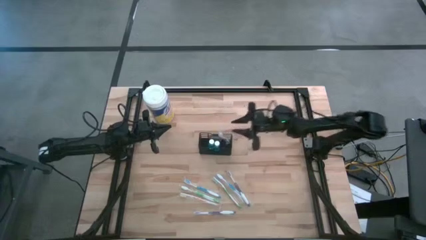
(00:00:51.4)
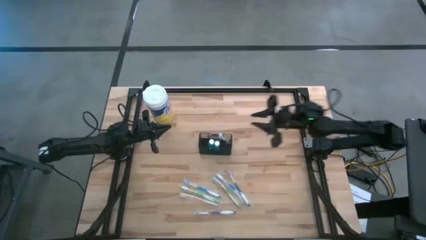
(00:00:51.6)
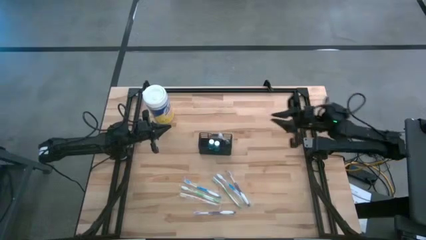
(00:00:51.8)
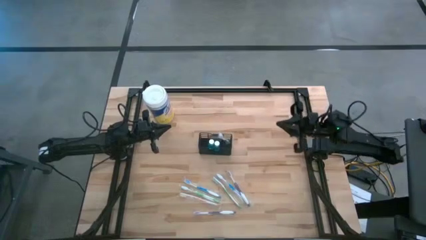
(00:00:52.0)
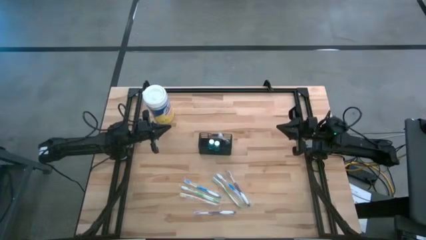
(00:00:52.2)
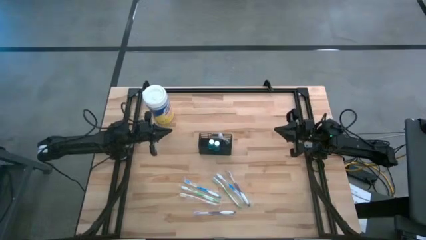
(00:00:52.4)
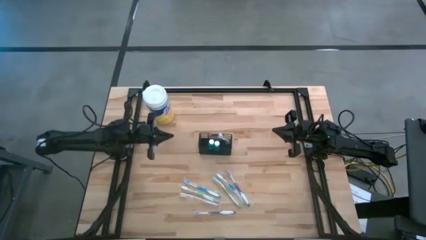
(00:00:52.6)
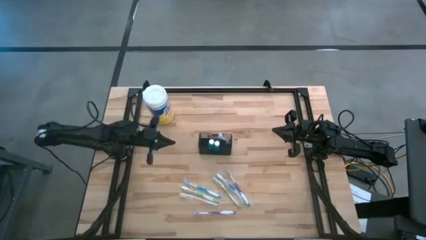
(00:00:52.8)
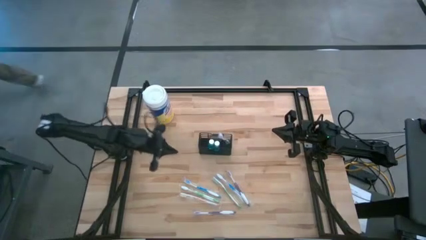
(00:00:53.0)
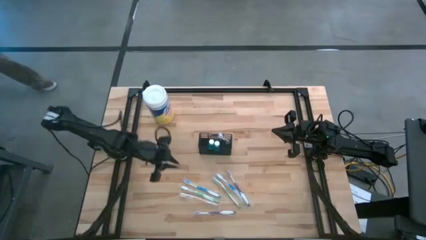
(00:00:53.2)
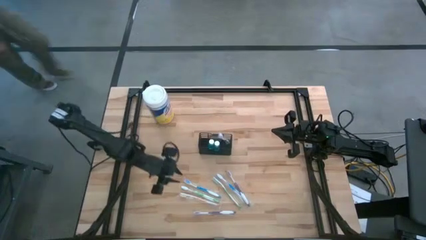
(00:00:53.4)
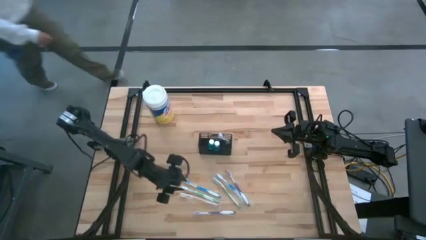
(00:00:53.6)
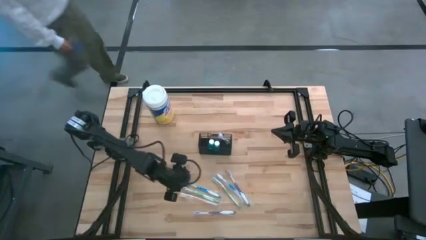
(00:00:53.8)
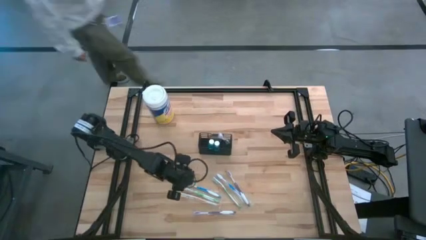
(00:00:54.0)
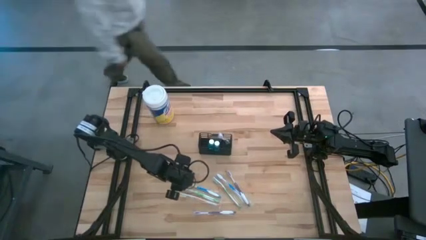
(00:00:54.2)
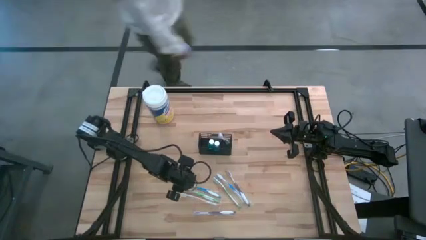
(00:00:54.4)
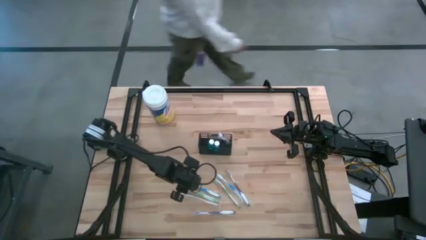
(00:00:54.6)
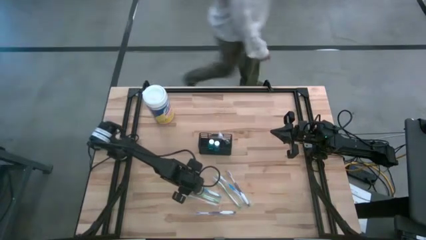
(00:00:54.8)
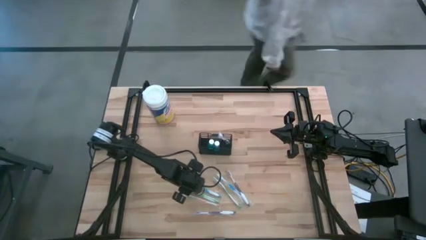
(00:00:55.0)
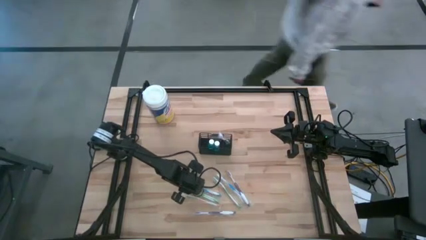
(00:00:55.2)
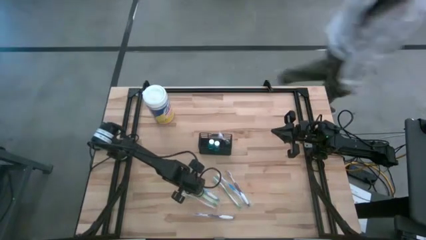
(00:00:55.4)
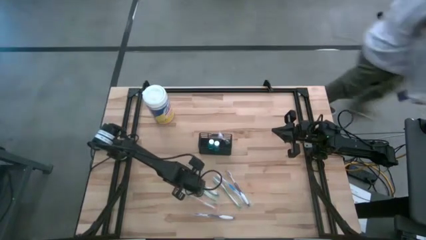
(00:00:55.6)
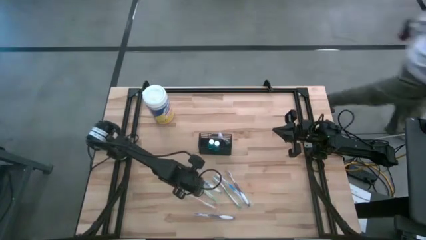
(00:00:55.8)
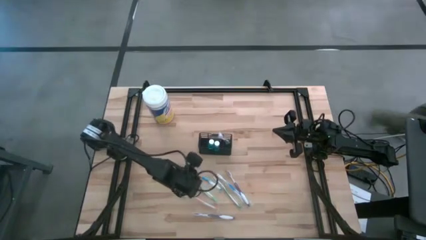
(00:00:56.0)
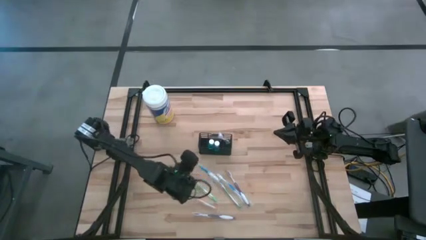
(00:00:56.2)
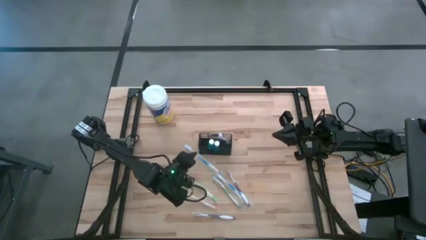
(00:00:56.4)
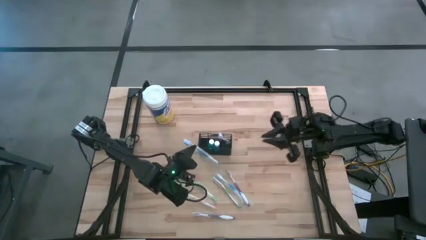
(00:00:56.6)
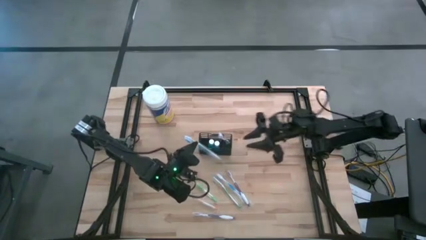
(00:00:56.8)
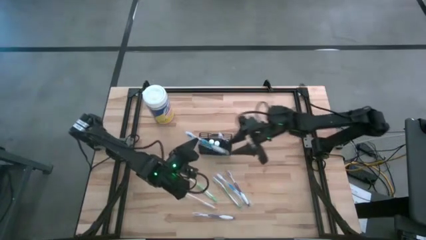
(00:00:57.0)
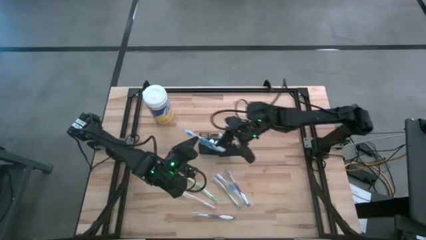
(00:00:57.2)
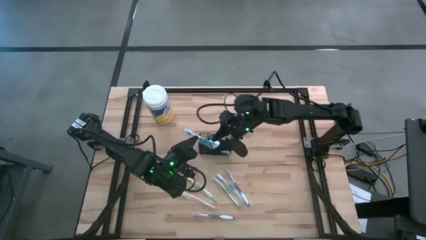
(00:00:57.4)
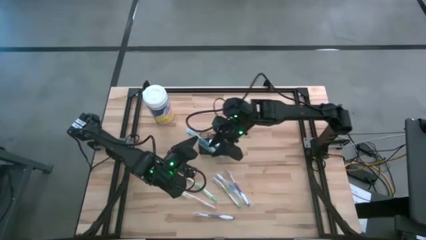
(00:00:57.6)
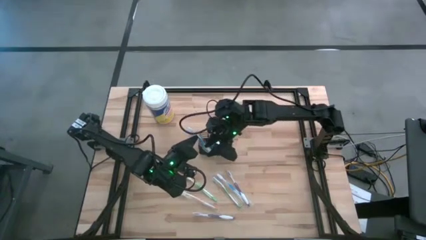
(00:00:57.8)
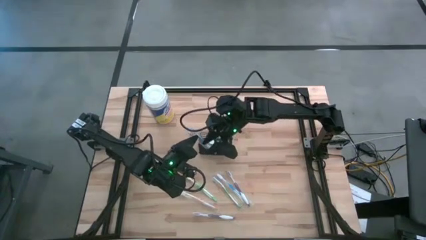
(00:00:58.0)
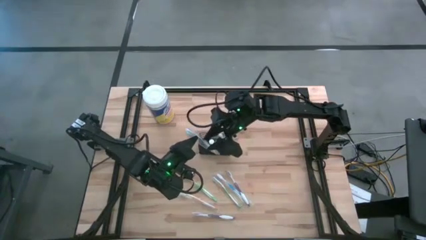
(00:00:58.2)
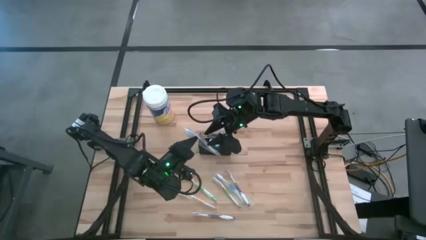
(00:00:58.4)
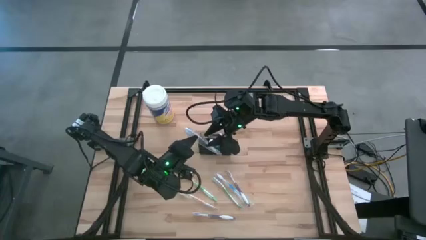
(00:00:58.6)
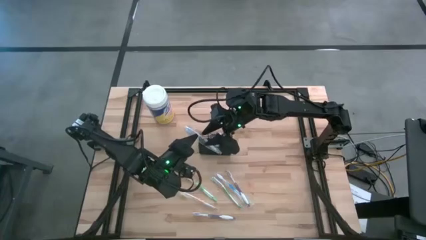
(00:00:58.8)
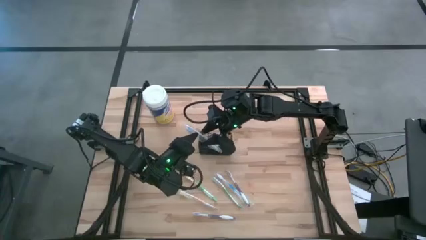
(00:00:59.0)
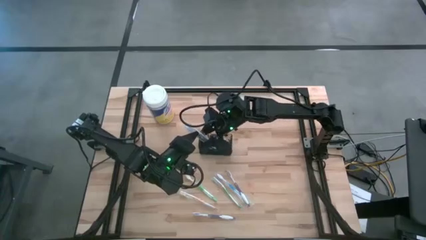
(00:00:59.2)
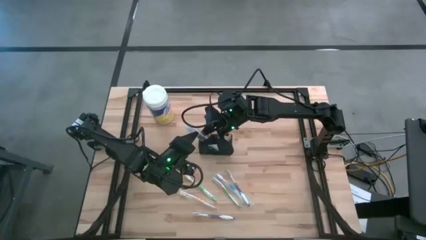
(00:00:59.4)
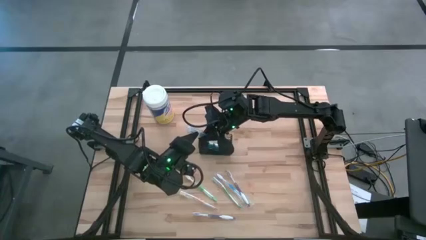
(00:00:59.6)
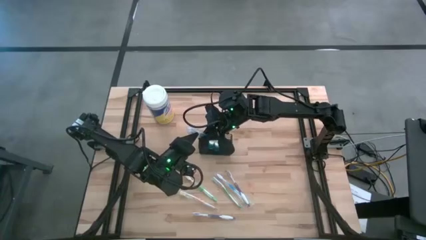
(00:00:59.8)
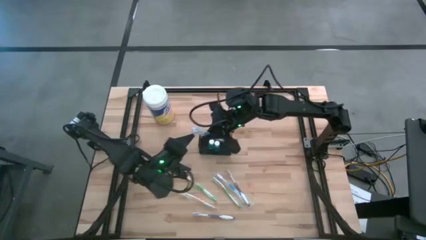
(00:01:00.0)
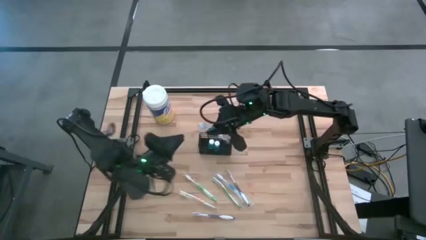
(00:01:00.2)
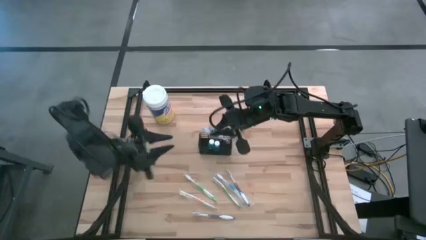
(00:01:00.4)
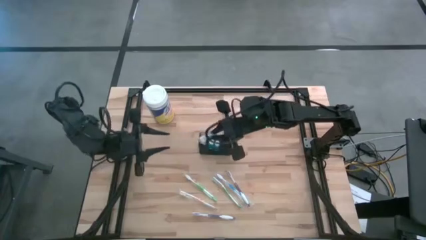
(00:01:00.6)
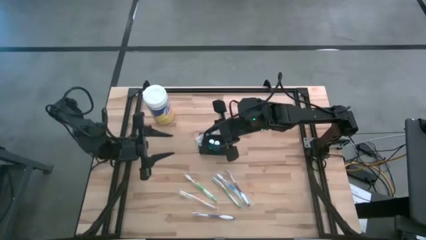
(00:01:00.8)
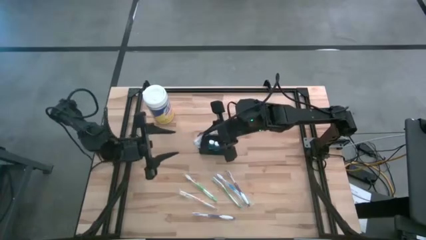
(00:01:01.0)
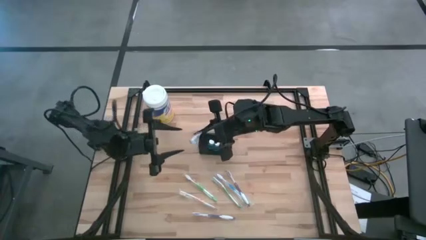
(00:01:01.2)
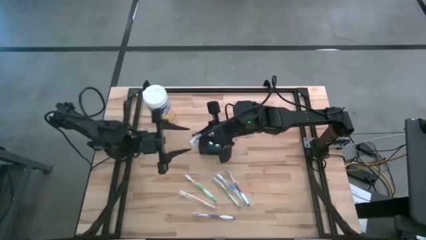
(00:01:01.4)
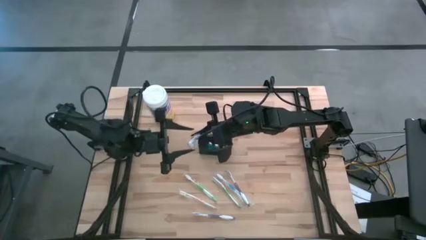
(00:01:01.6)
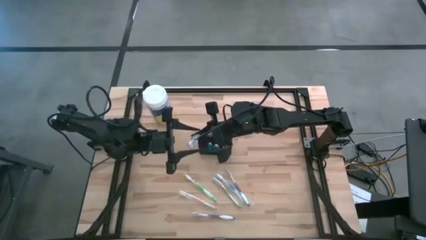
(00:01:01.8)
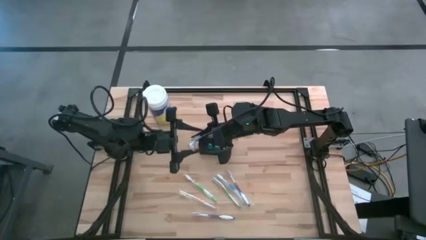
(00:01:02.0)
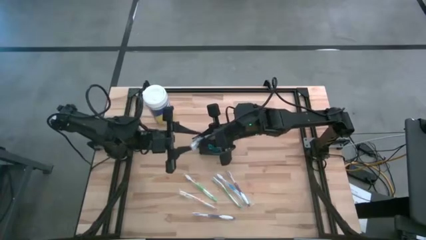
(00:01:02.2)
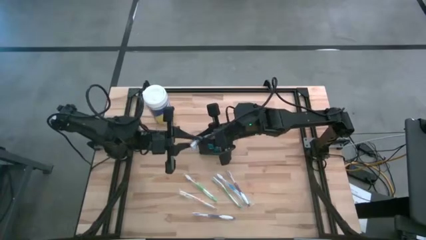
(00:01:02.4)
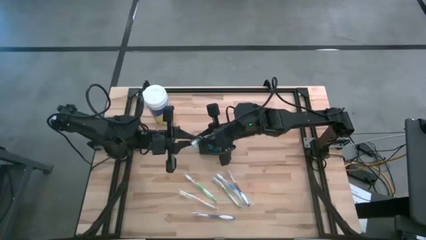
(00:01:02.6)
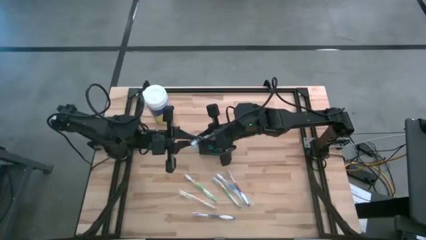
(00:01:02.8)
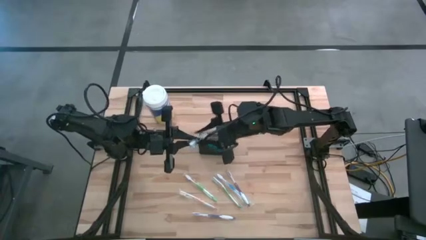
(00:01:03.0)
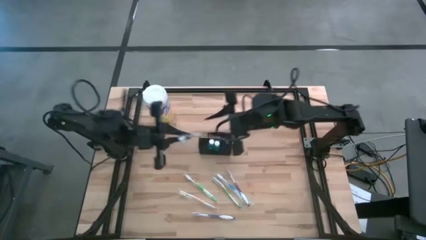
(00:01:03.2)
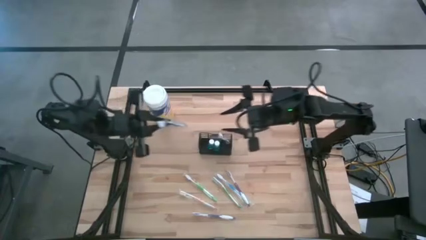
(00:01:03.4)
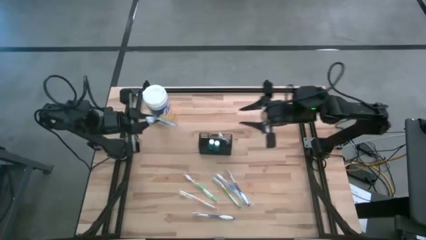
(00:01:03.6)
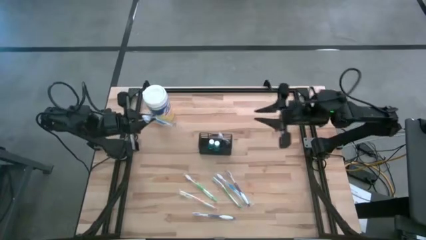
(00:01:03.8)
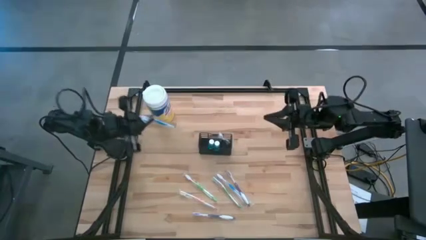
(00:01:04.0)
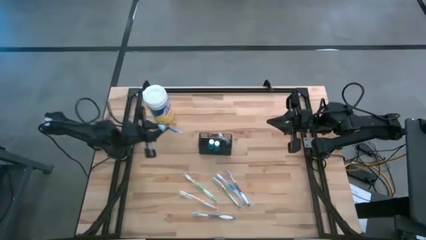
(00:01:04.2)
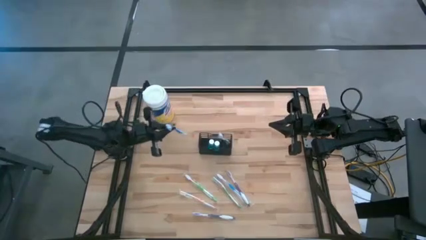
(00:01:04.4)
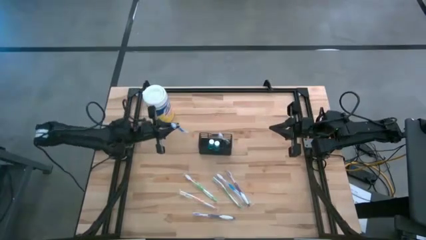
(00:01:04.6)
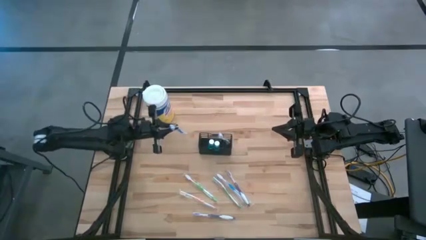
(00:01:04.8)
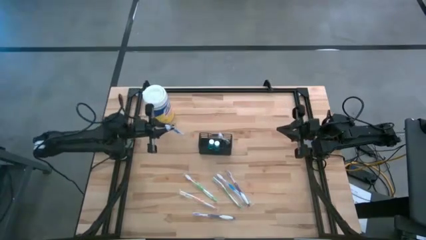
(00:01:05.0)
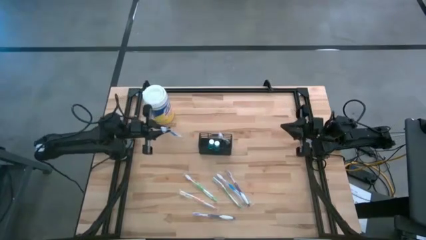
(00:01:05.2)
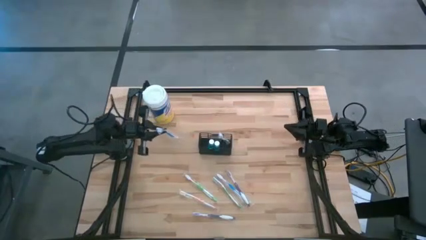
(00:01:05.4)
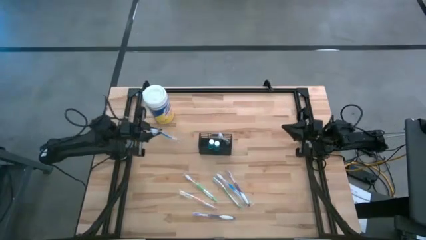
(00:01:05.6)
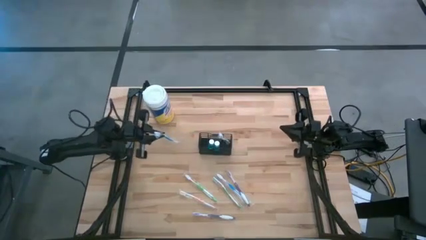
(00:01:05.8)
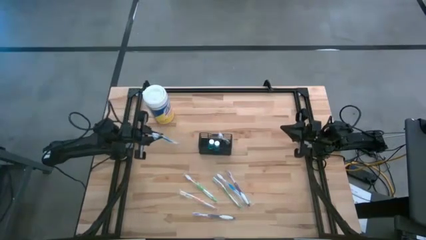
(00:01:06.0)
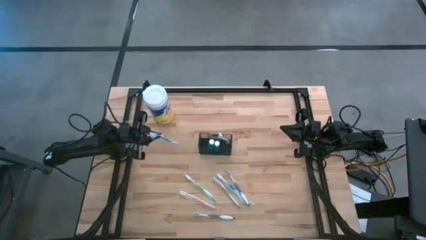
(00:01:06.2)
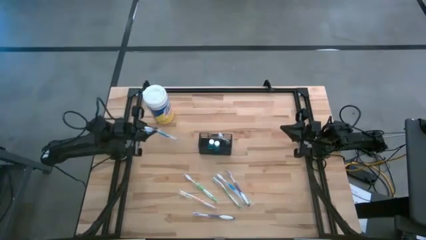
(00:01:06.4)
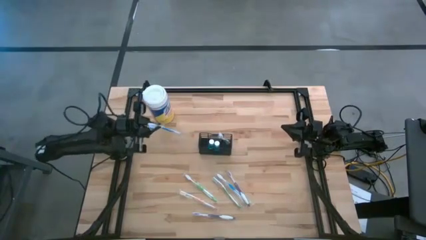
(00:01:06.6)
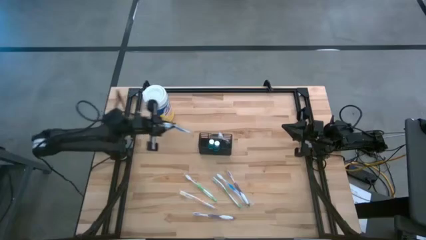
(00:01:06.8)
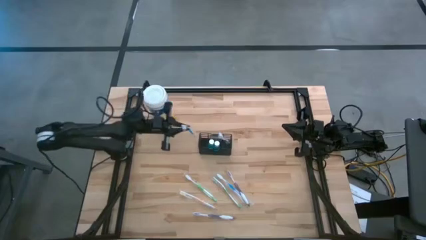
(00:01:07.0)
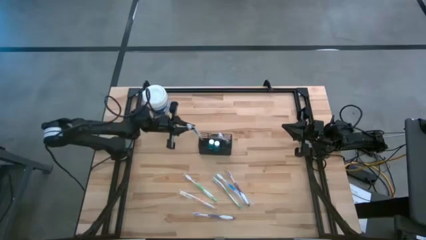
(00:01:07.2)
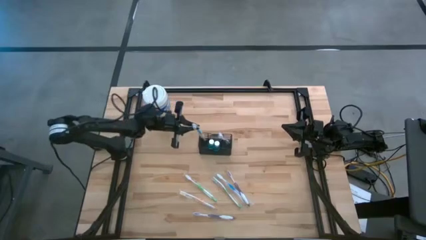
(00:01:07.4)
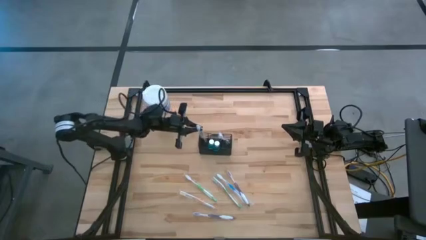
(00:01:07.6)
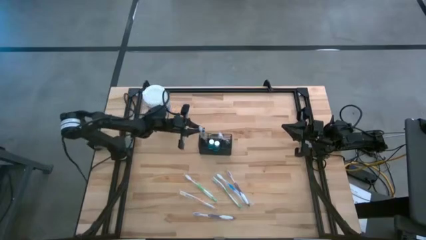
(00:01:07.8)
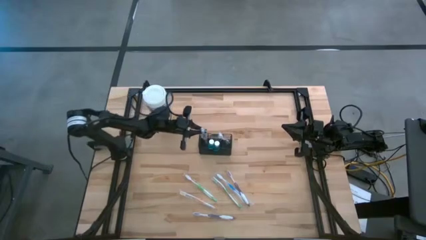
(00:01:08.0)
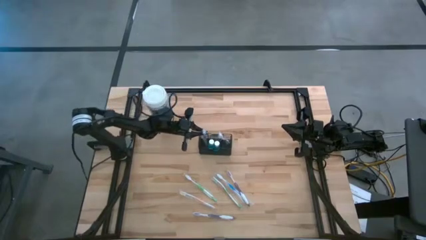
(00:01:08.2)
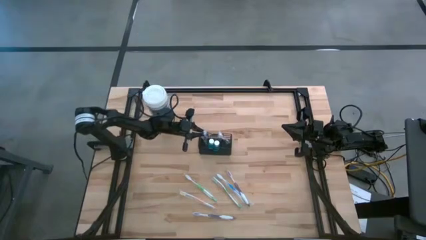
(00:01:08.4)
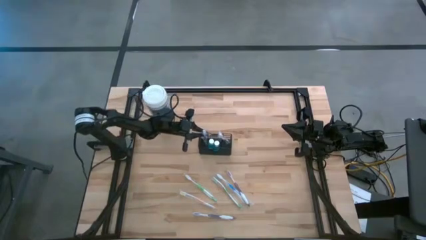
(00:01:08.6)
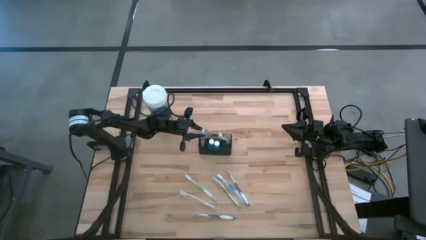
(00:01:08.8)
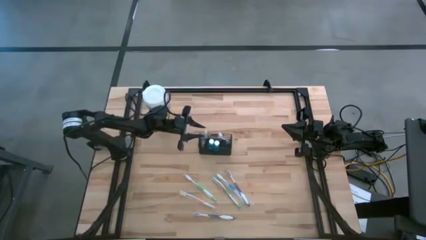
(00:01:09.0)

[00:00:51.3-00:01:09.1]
Task: Pick & Place toothbrushing station
Put the left blue toothbrush into the mesh organizer
